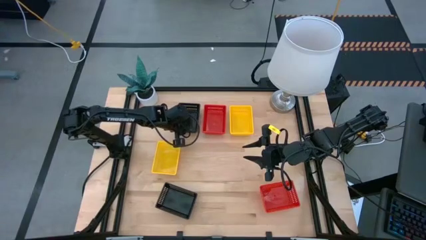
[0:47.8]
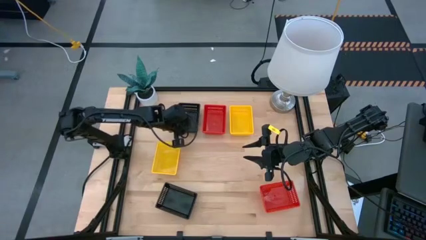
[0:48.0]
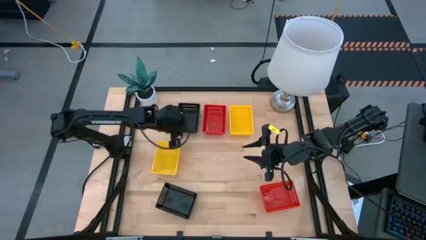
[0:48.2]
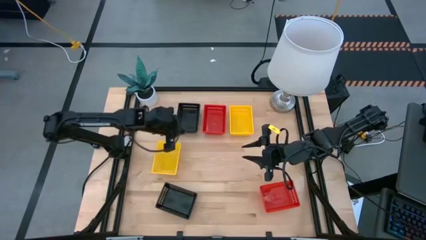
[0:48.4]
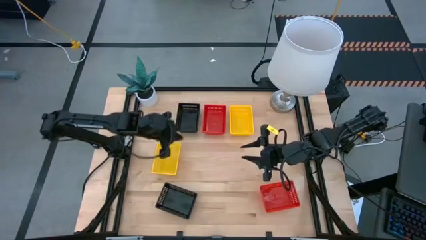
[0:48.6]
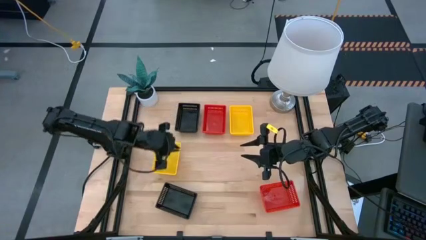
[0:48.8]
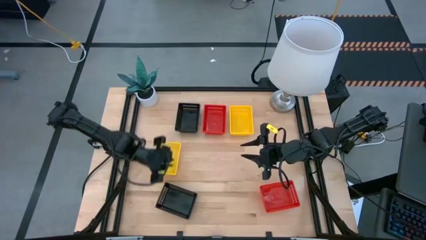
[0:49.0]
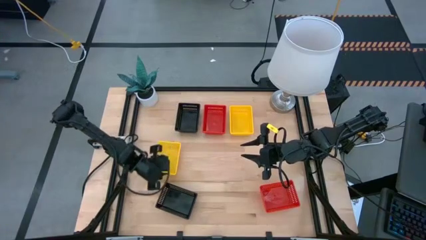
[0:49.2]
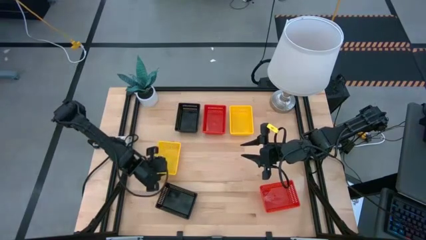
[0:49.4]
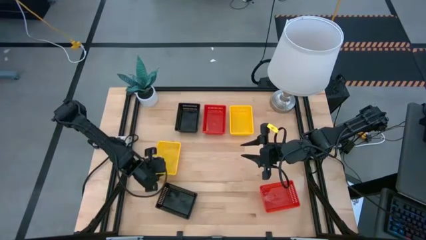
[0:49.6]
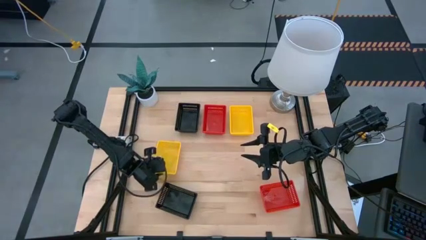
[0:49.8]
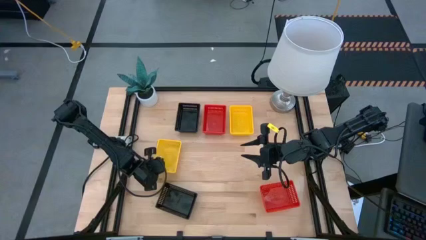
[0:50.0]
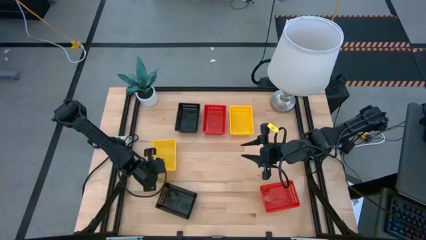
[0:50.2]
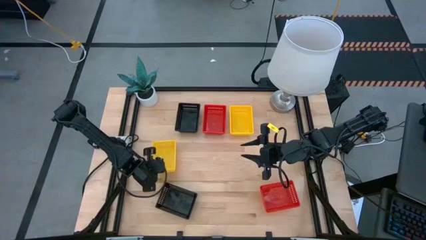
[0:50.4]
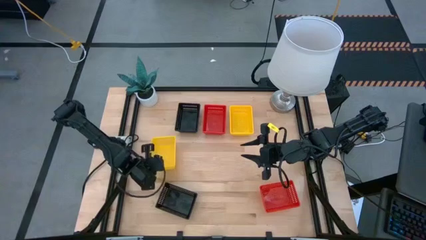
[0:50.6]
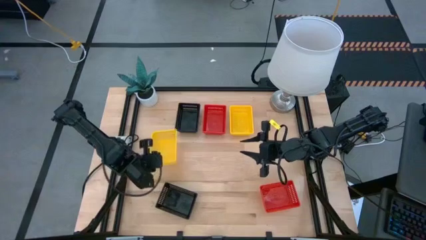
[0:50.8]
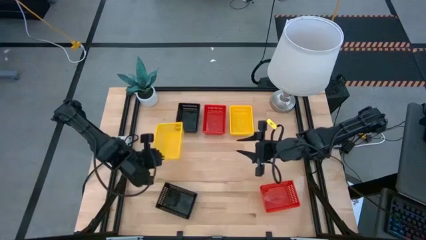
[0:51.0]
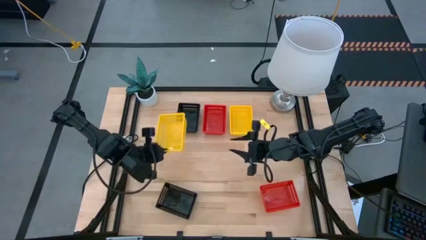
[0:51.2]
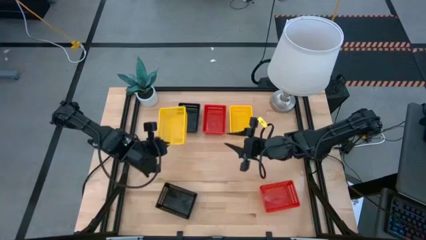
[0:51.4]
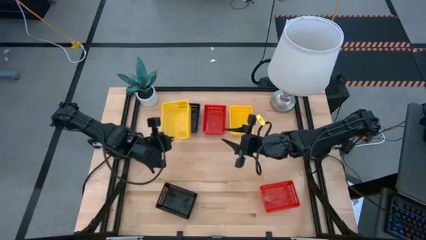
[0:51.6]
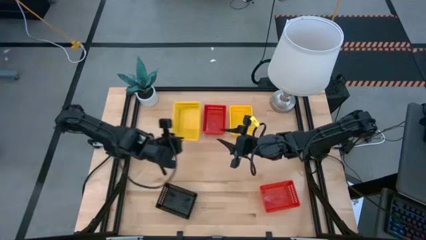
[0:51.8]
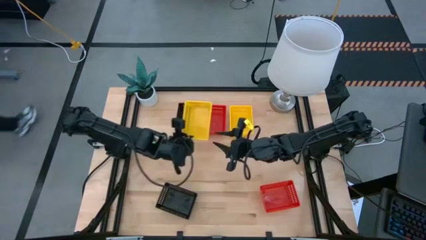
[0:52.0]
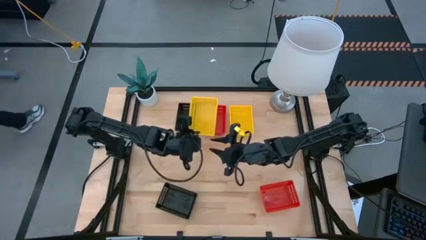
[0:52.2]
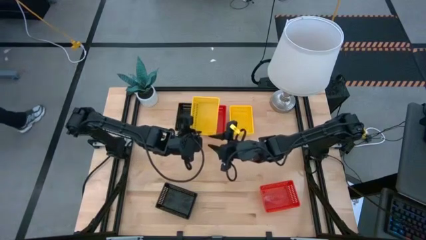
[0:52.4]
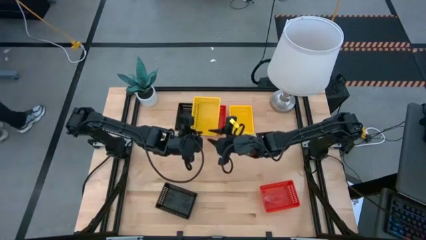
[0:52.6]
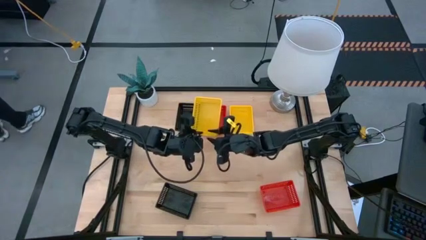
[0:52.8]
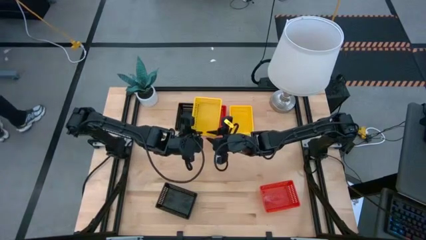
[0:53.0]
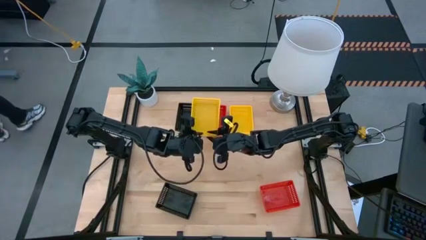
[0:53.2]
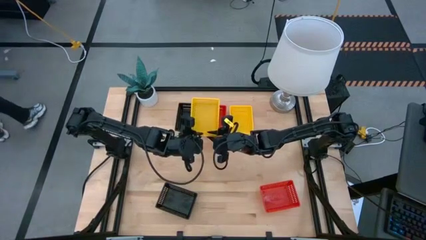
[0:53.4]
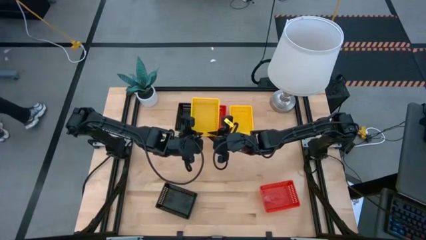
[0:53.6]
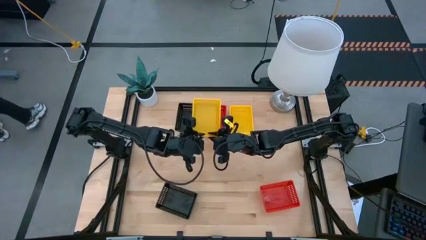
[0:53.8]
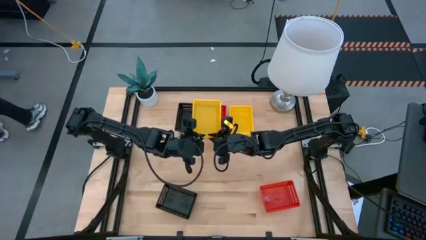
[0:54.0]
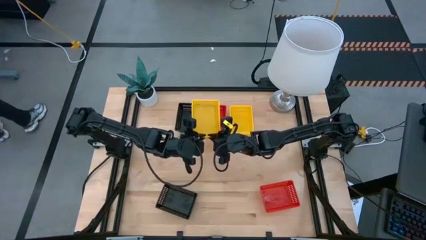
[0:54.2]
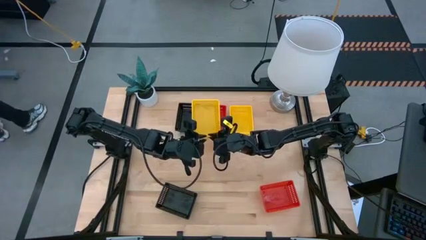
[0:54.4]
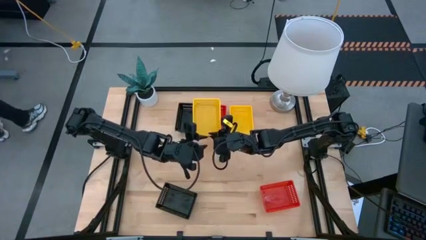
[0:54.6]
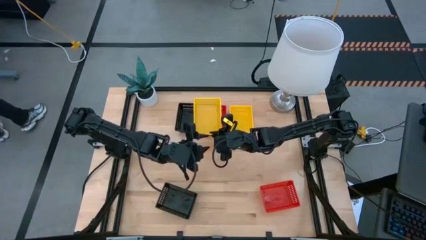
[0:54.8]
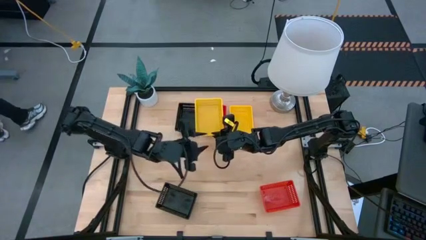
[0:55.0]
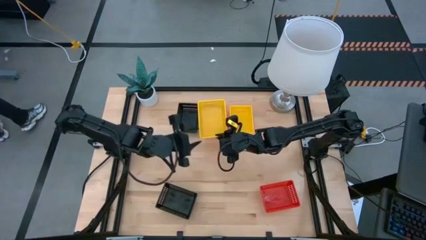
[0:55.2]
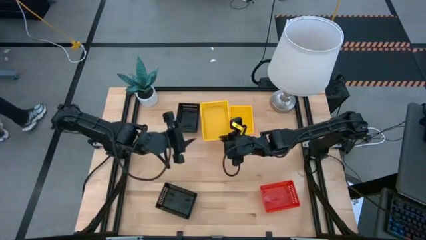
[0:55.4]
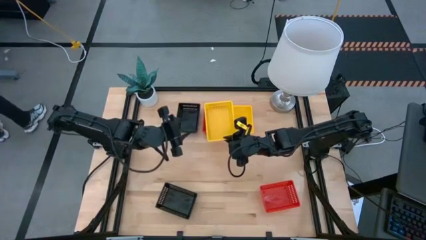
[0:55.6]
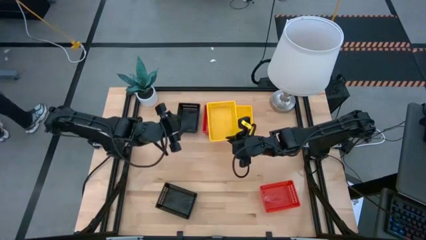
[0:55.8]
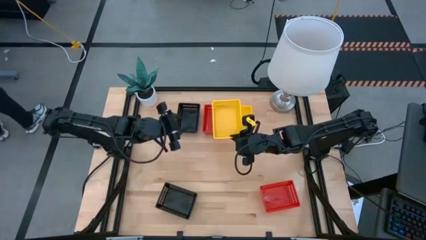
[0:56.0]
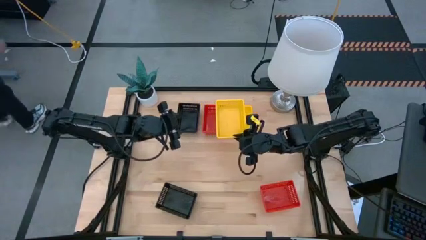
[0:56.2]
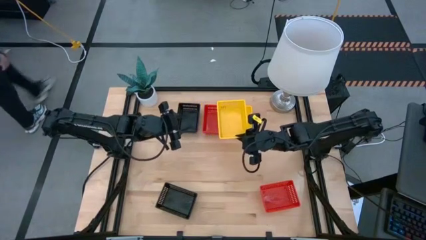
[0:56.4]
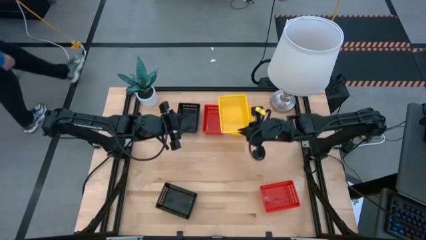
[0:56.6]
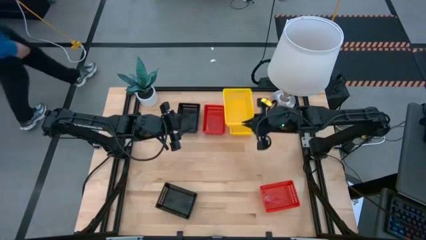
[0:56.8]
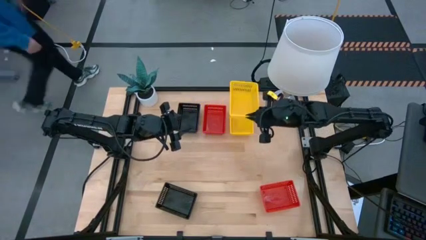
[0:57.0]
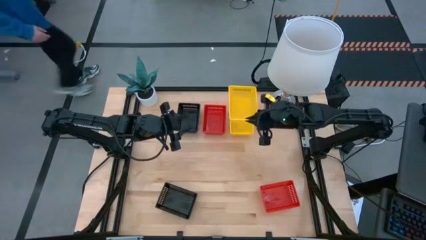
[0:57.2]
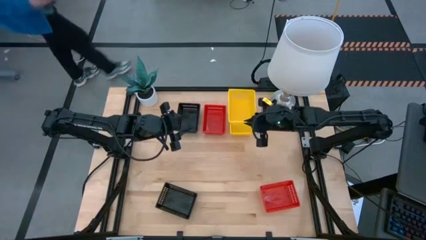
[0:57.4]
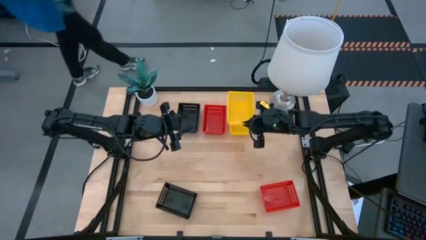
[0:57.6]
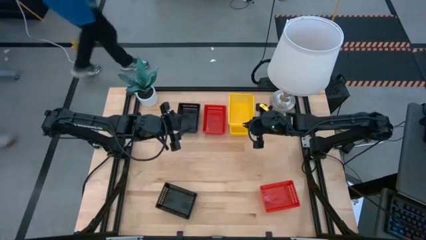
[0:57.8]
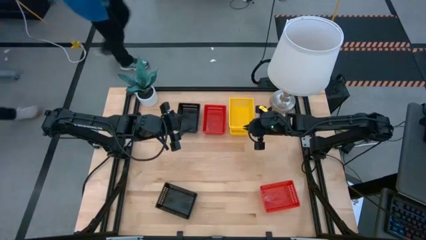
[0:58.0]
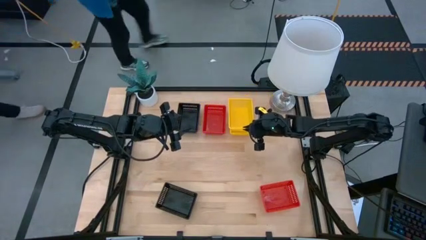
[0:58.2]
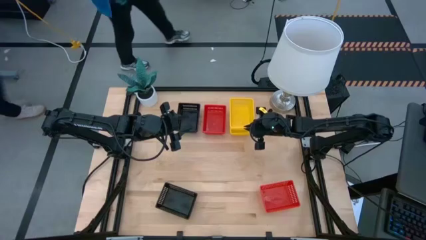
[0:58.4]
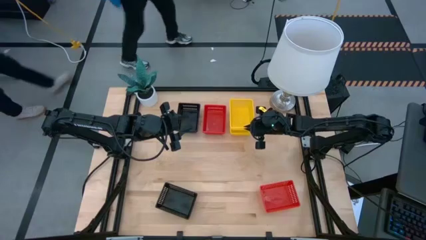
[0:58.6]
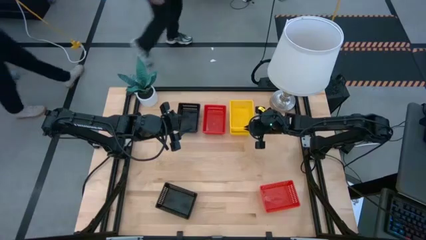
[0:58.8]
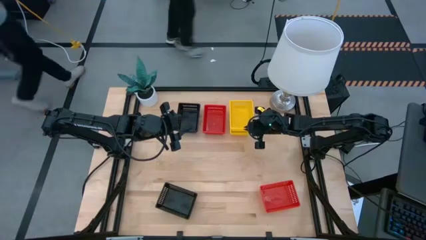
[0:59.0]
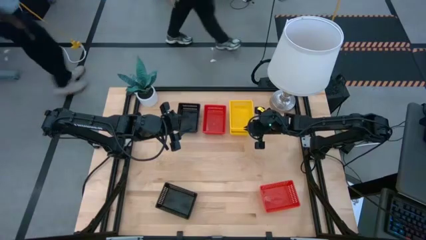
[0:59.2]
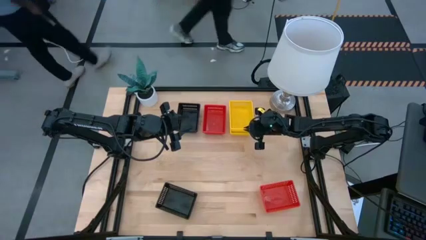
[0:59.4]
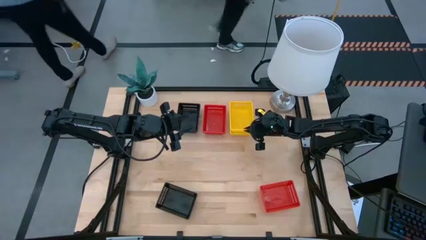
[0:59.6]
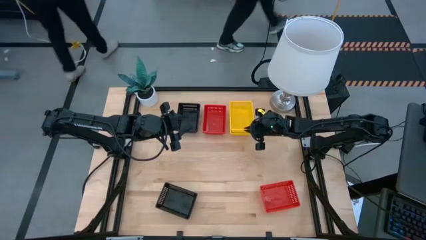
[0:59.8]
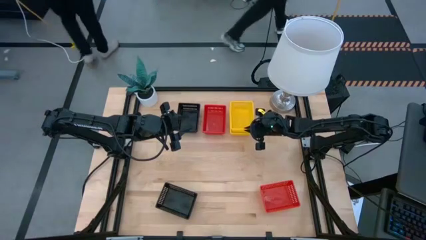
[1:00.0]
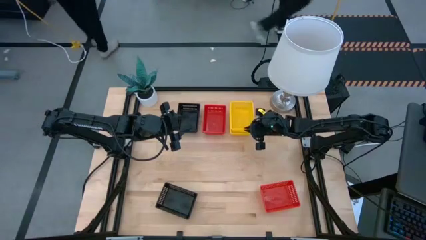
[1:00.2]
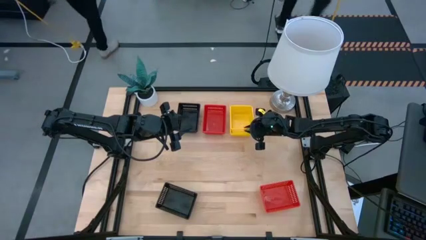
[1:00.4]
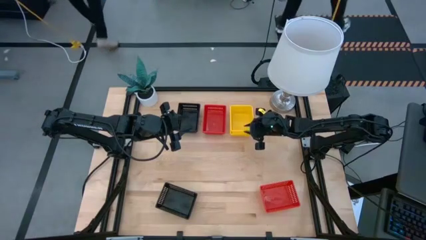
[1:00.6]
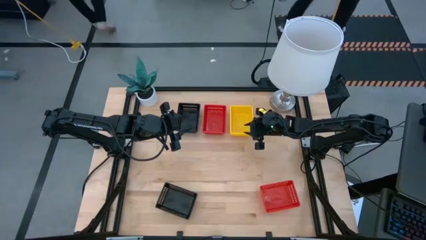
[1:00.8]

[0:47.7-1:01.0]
Stack the left yellow bin on the stacked yellow bins
